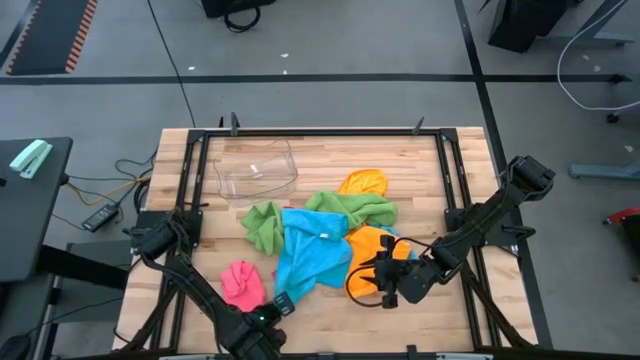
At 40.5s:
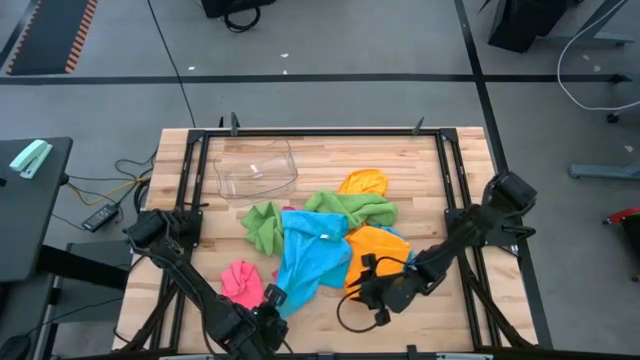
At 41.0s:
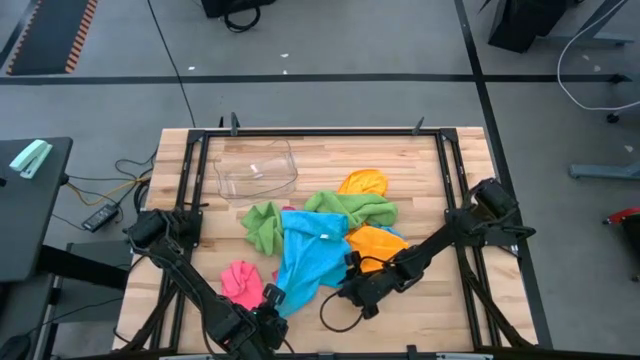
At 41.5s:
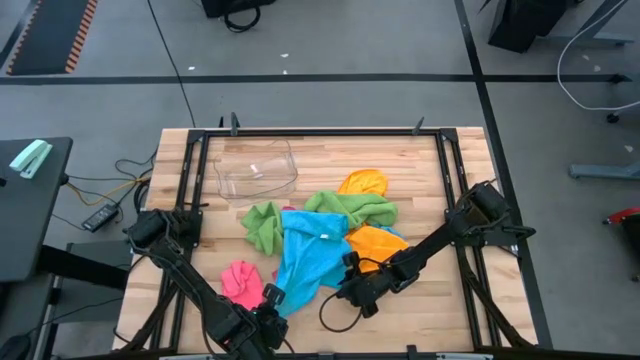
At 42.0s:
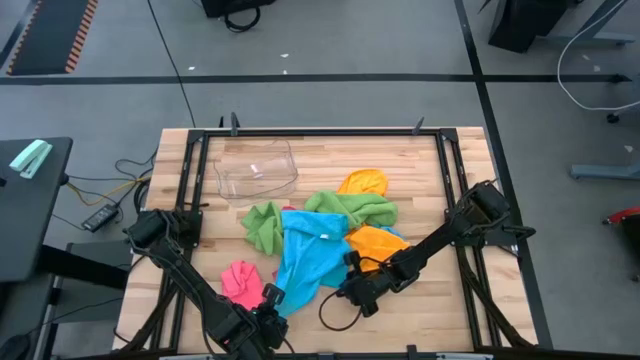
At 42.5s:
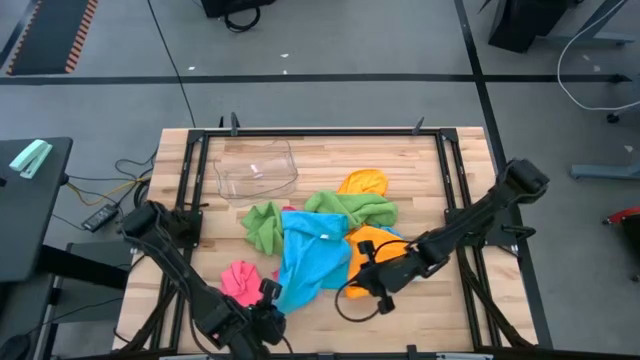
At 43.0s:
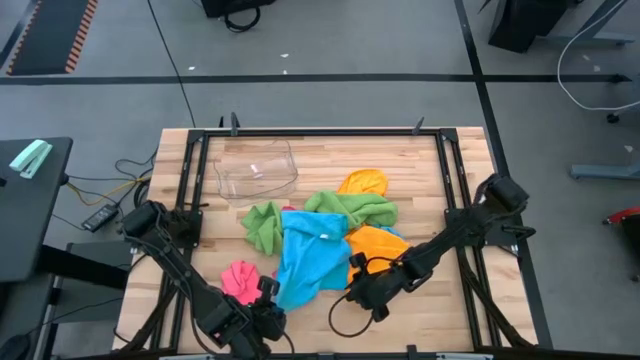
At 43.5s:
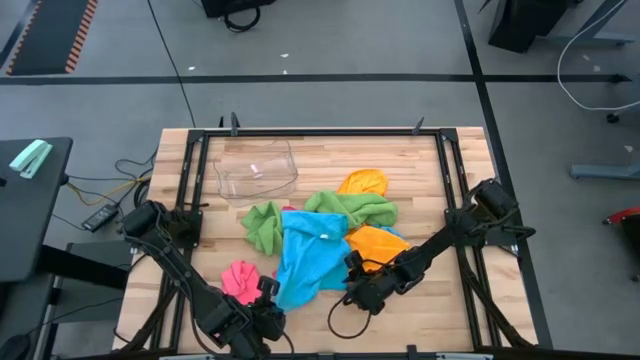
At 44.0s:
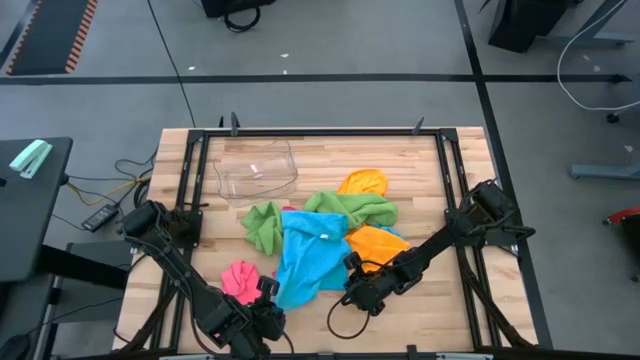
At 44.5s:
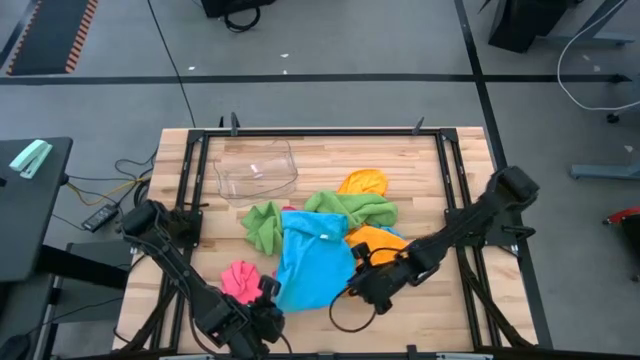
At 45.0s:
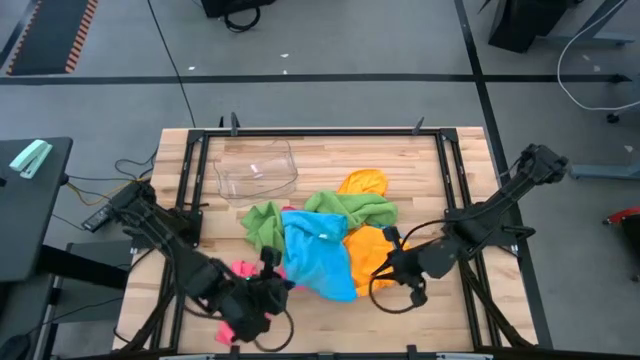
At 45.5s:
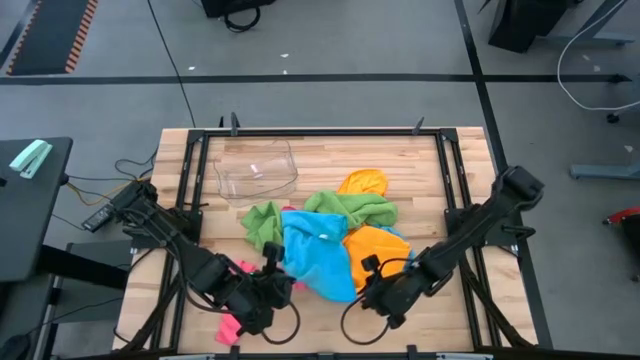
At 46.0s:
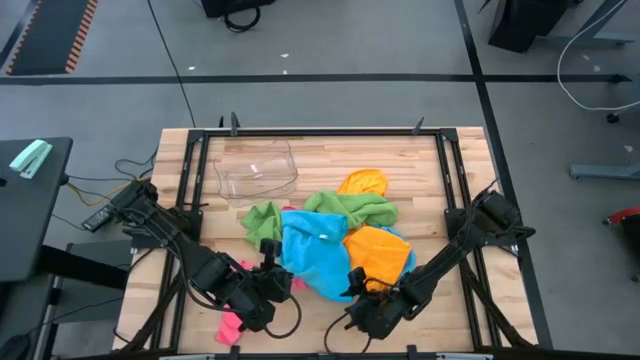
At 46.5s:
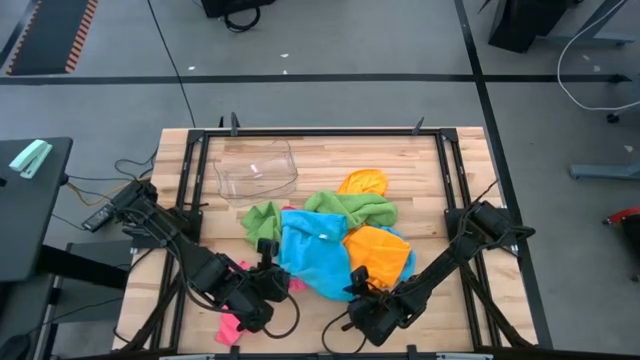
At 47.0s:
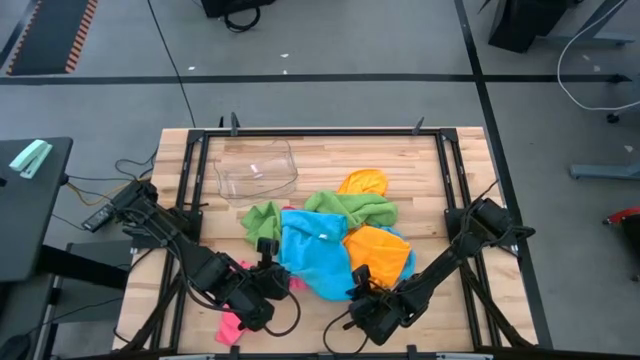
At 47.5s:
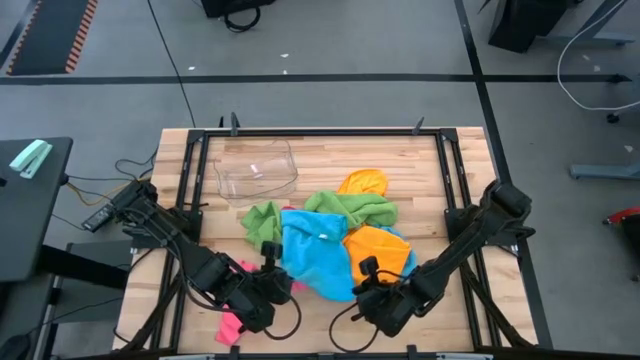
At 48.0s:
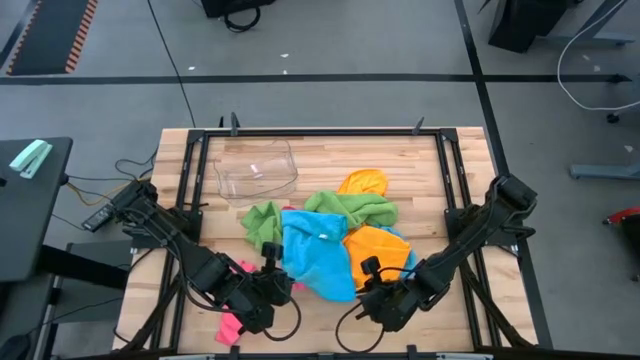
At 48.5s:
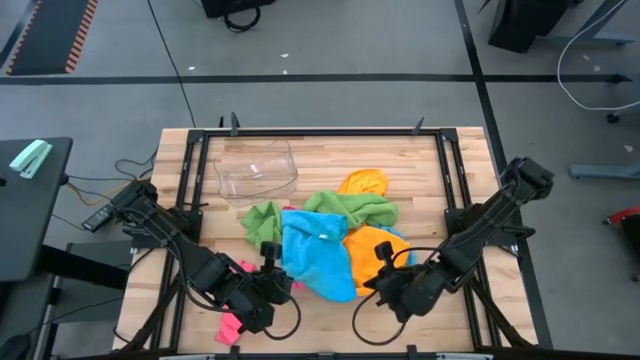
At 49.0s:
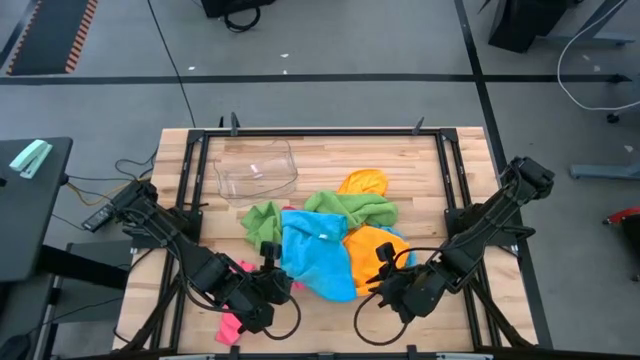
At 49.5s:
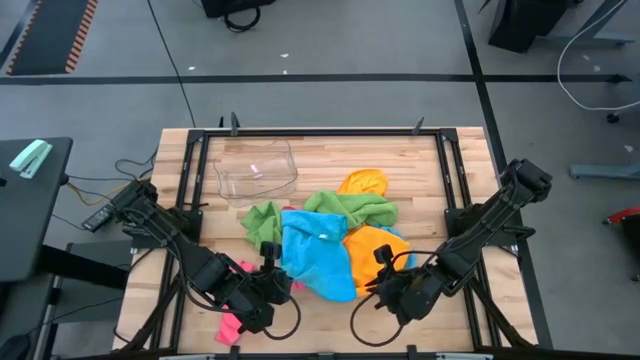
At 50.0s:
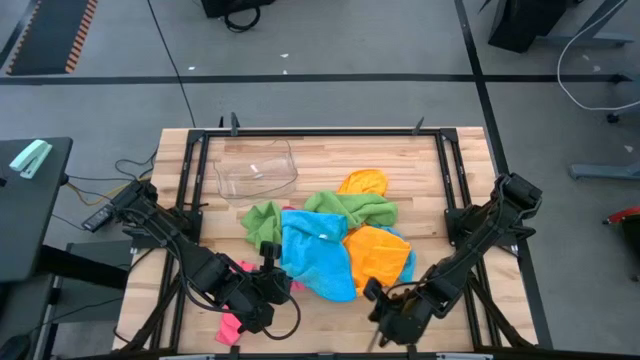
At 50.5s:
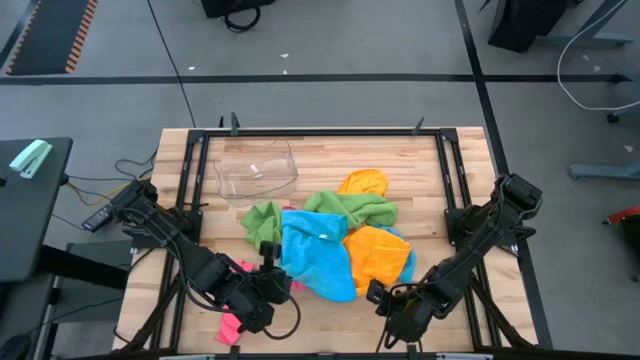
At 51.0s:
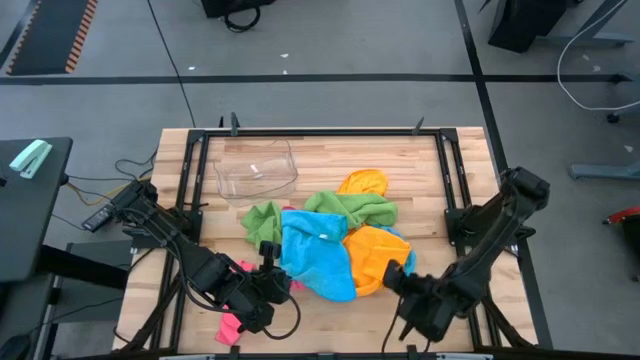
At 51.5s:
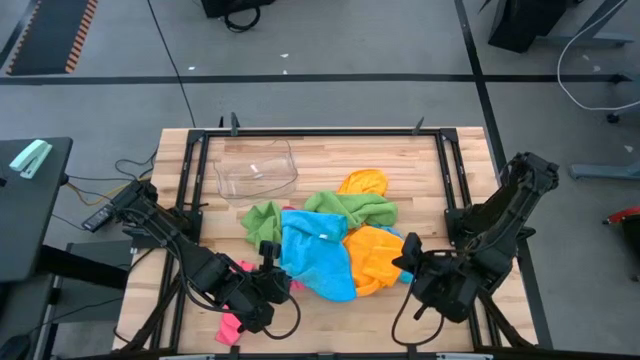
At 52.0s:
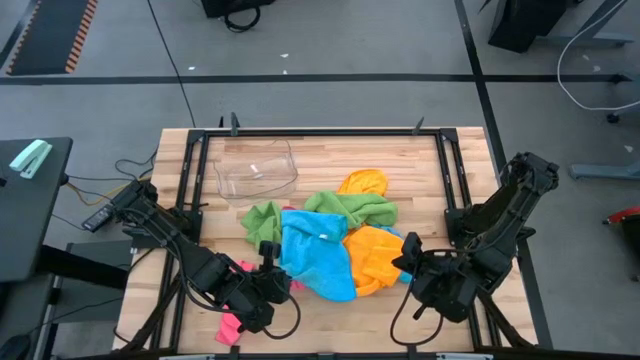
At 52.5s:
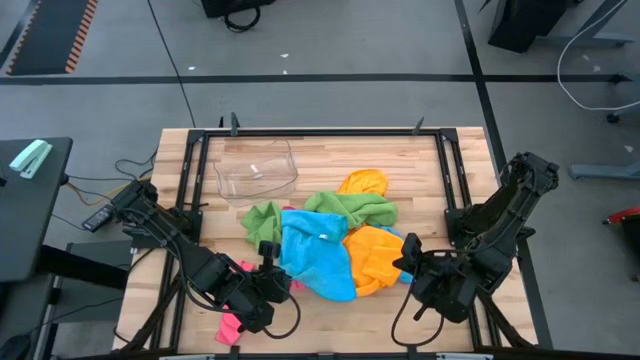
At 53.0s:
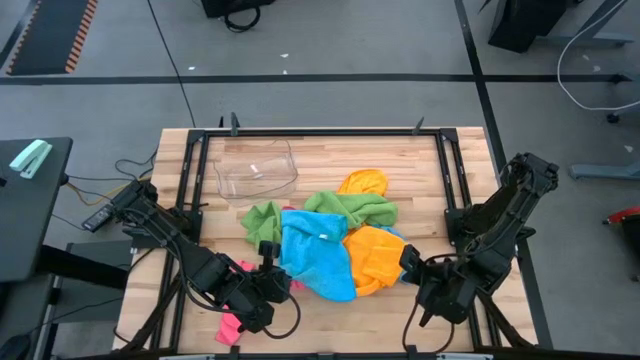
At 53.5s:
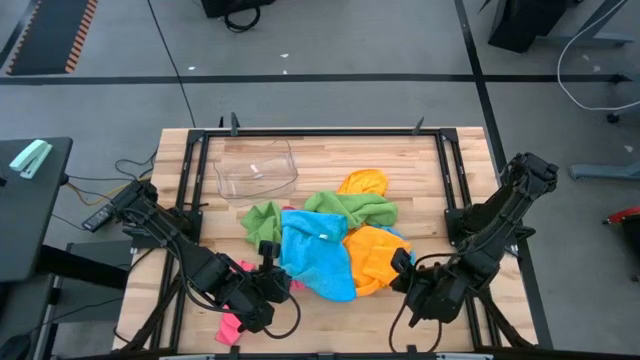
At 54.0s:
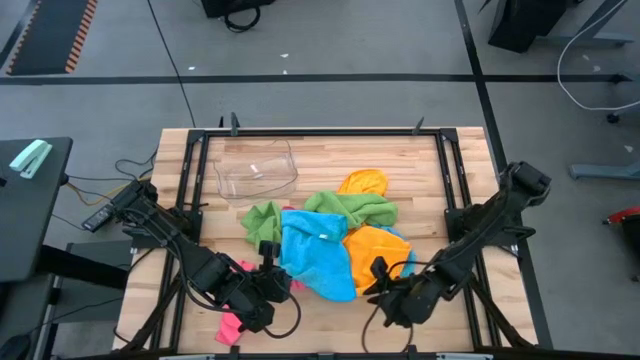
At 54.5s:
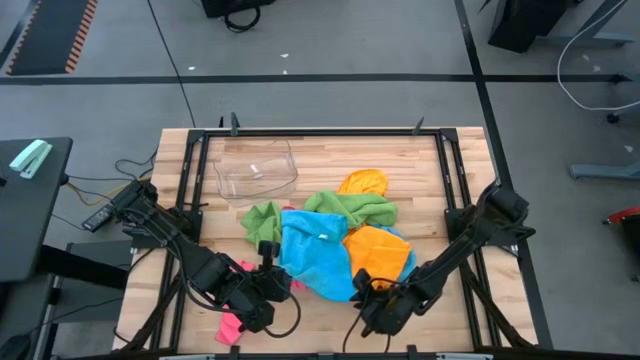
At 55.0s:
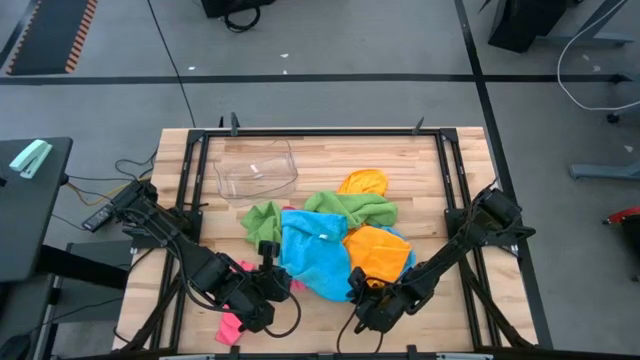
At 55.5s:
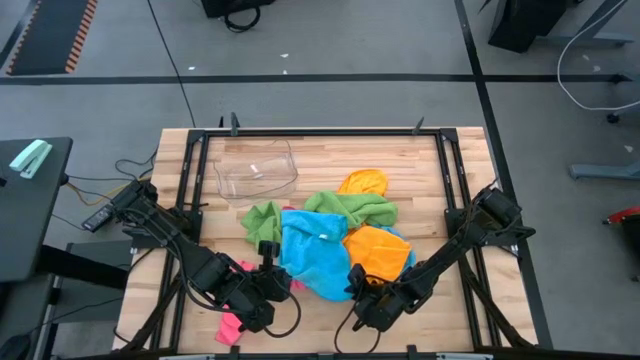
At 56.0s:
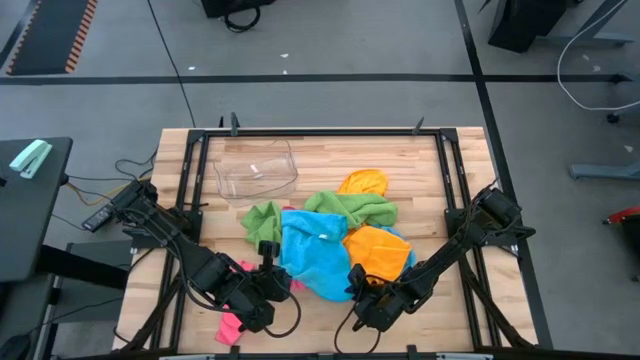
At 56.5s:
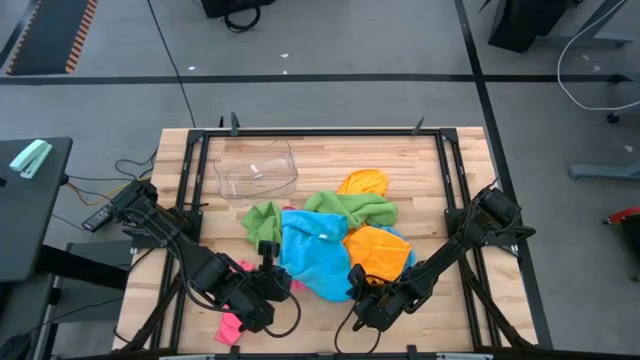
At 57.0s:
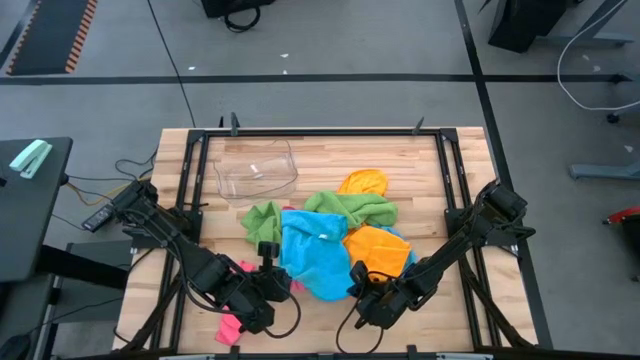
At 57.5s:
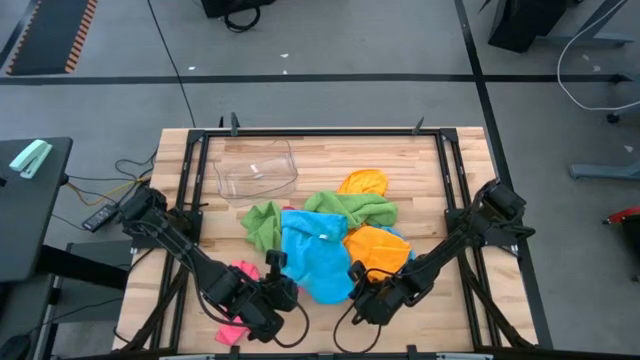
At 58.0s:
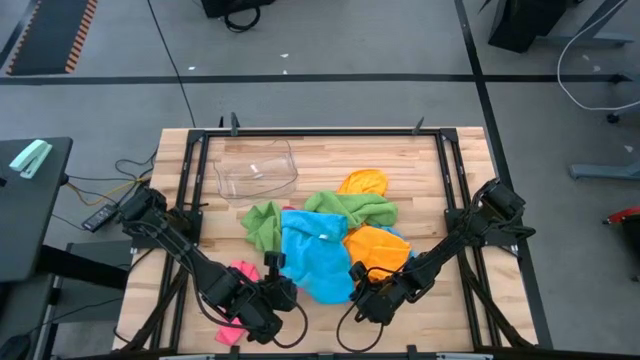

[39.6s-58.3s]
Task: Fold microfiber towels
Fold the left blue microfiber towel

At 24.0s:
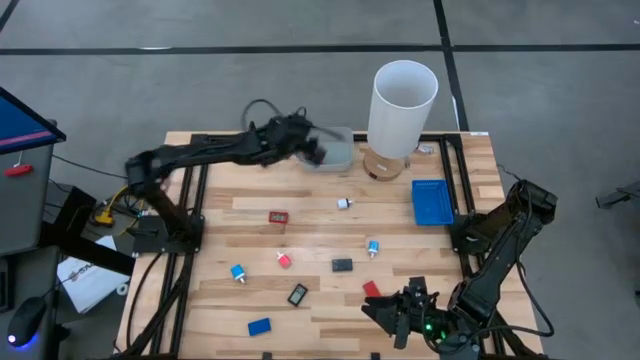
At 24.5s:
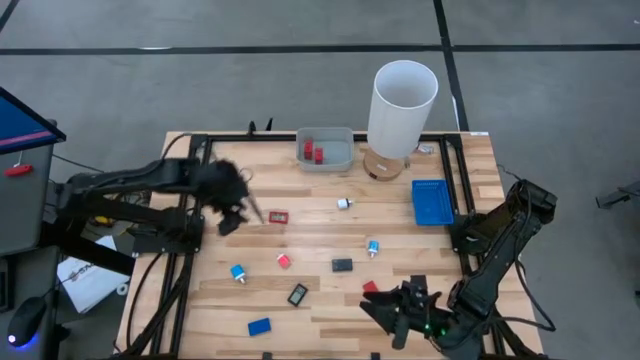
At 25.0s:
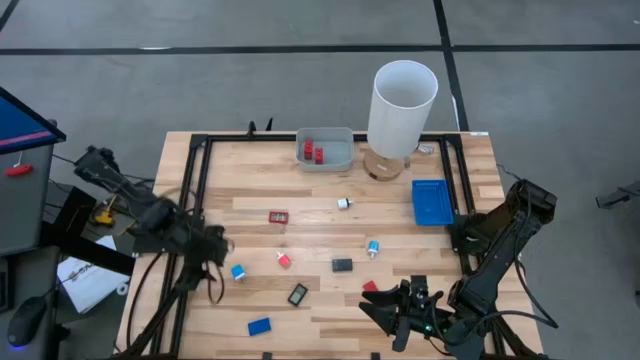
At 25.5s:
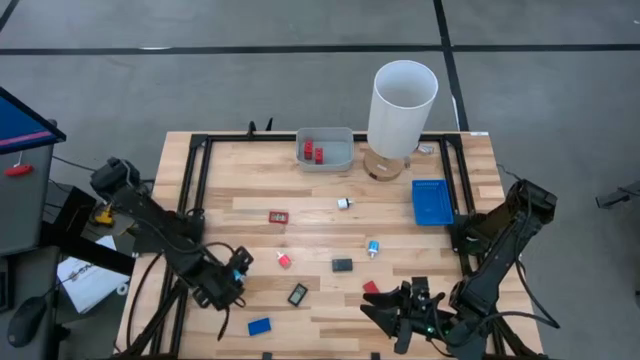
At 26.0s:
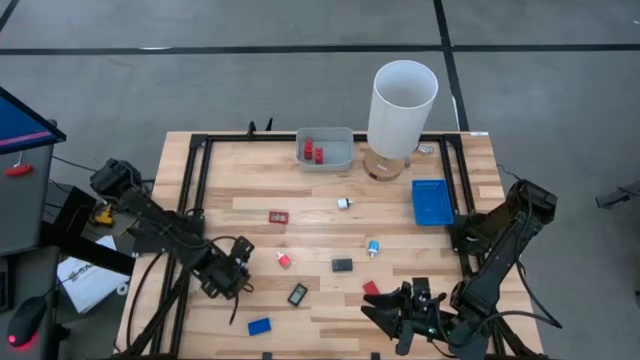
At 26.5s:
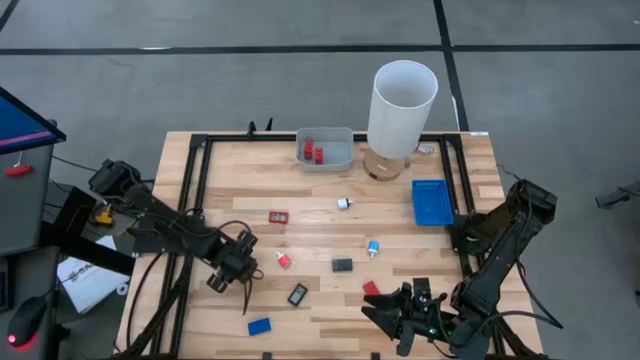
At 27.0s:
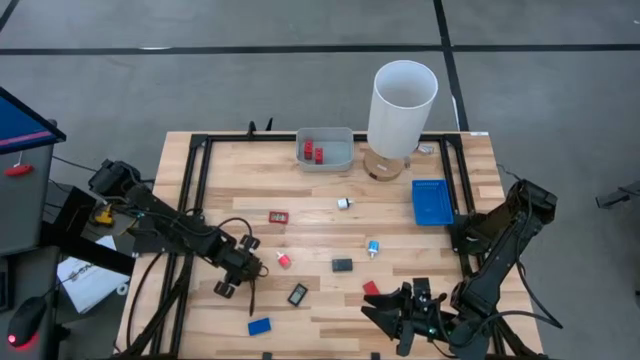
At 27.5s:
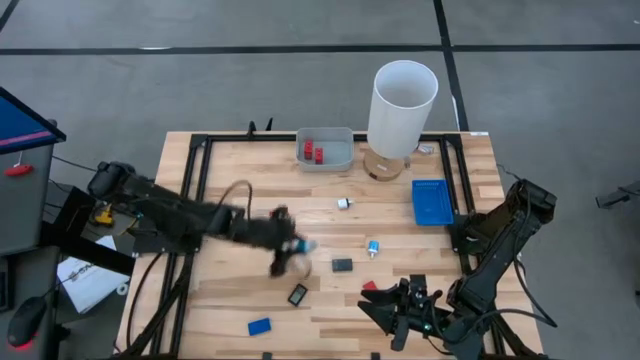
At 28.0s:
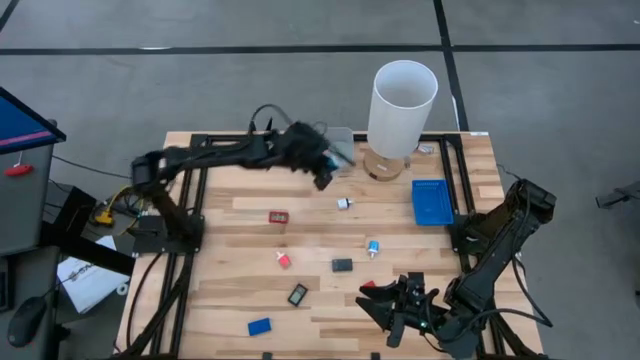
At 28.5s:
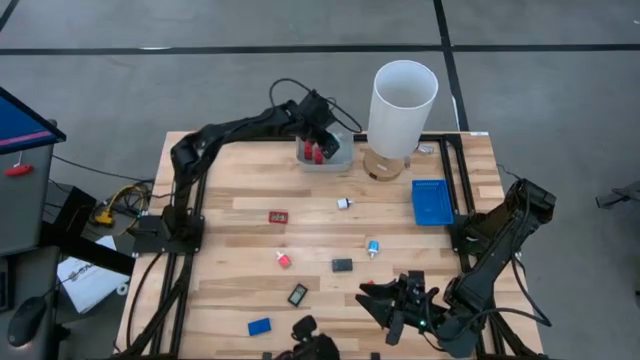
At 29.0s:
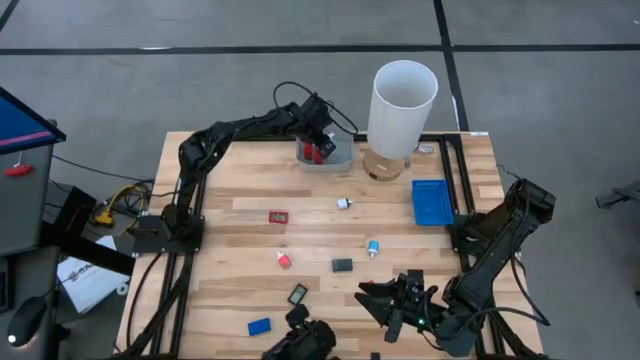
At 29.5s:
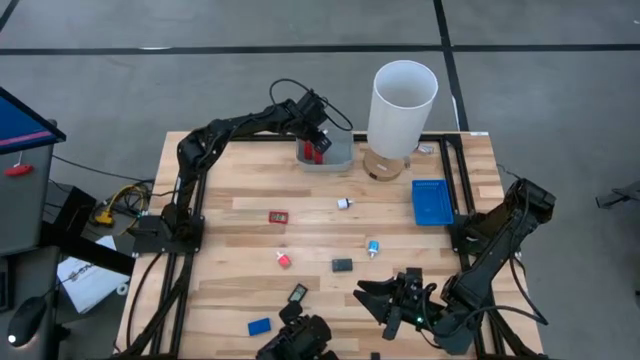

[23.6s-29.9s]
Task: Pick & Place Office items
Put the left blue charger adapter into the gray bin
